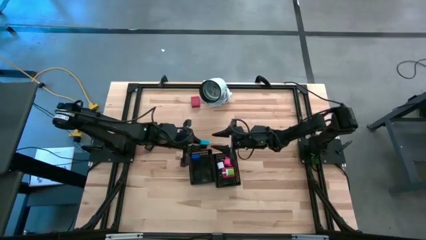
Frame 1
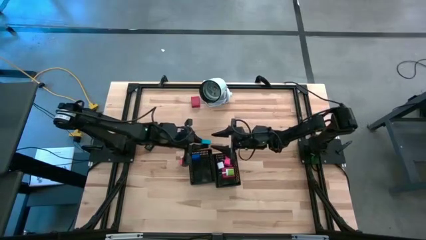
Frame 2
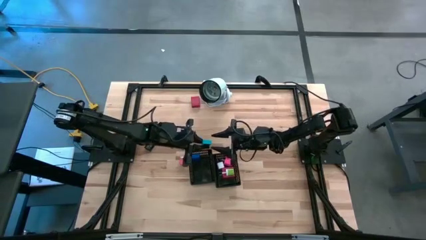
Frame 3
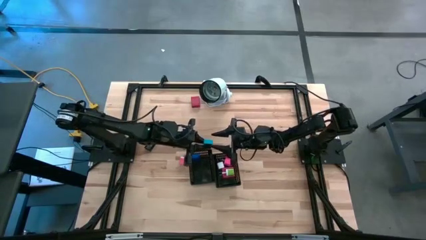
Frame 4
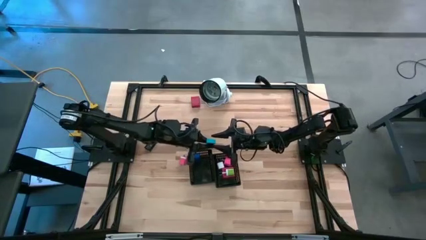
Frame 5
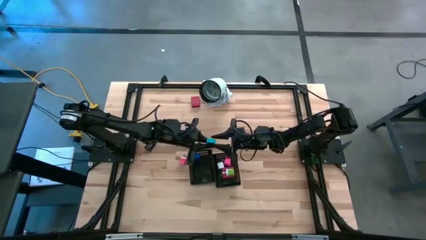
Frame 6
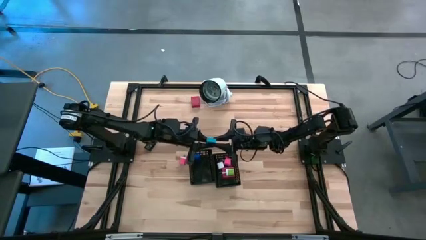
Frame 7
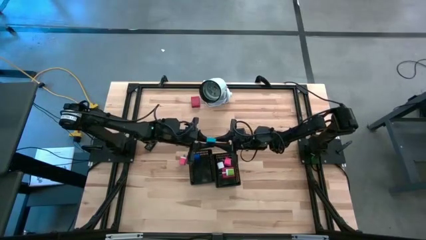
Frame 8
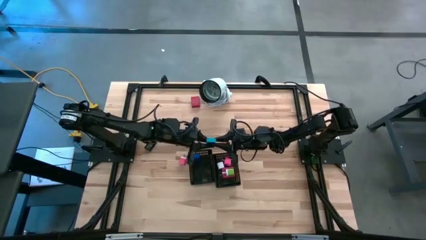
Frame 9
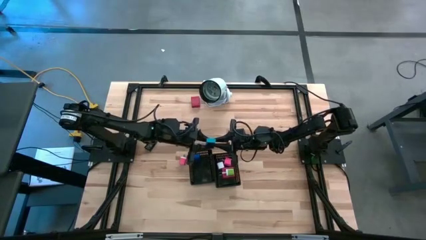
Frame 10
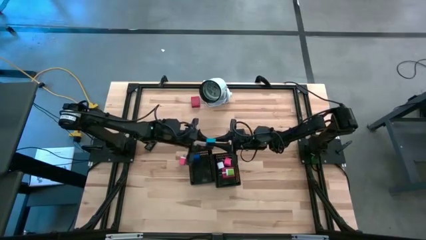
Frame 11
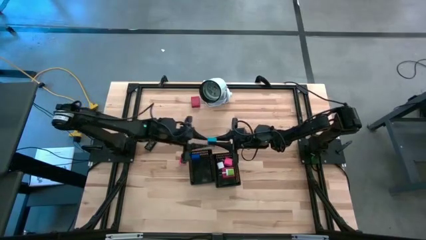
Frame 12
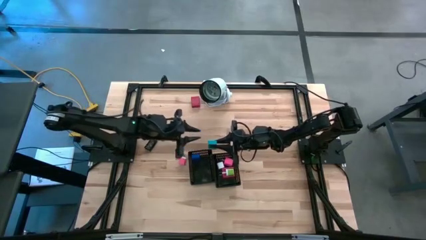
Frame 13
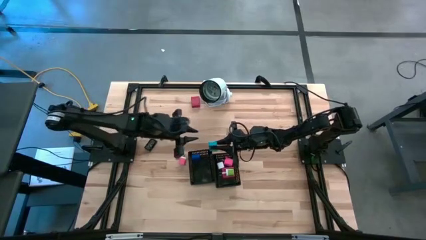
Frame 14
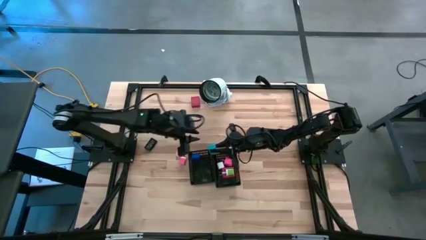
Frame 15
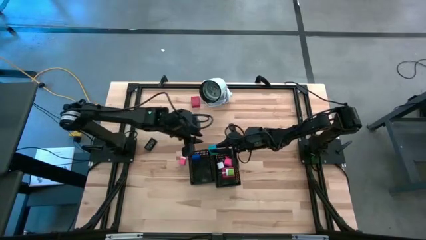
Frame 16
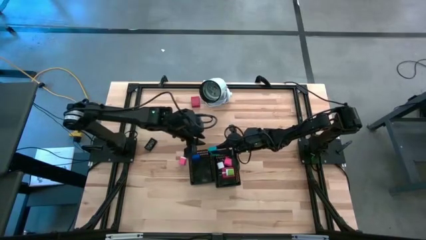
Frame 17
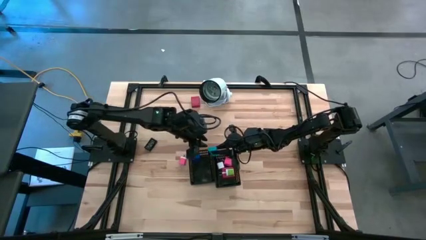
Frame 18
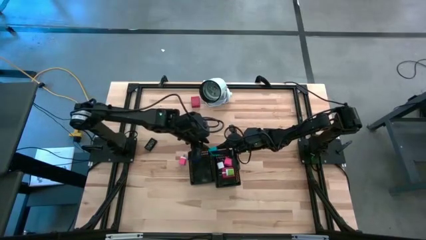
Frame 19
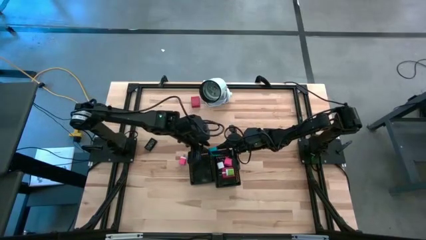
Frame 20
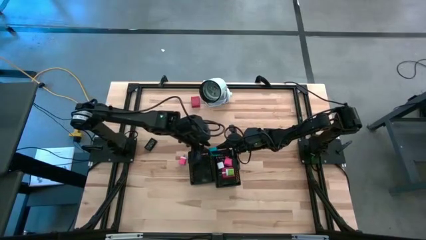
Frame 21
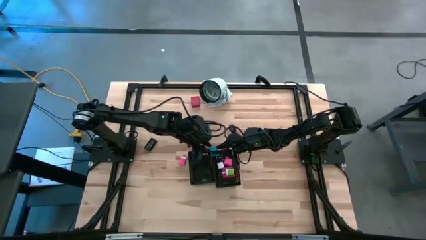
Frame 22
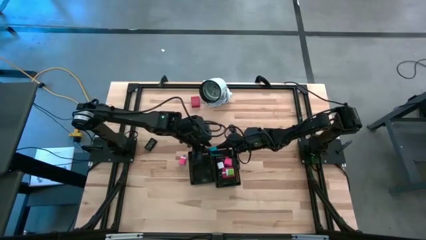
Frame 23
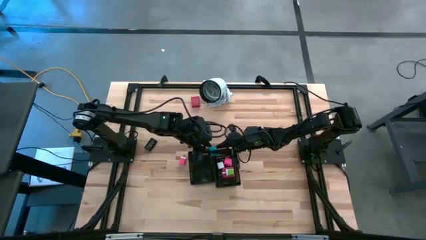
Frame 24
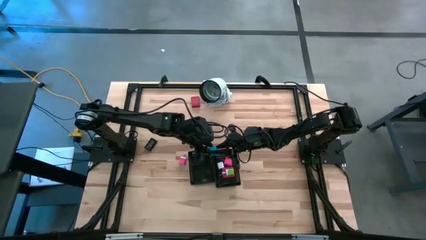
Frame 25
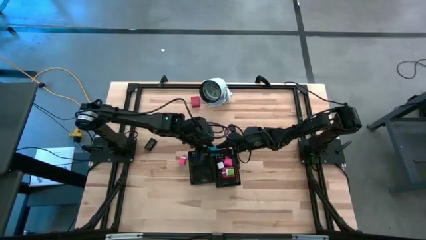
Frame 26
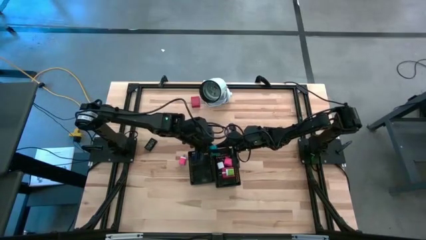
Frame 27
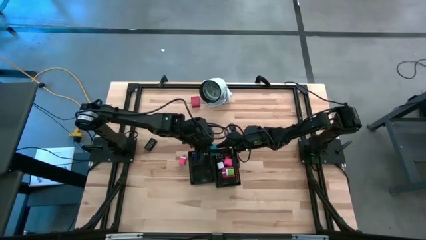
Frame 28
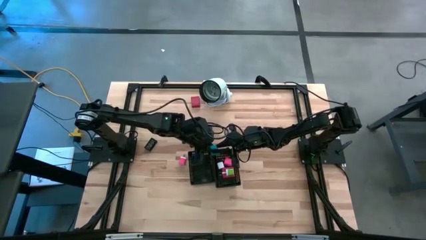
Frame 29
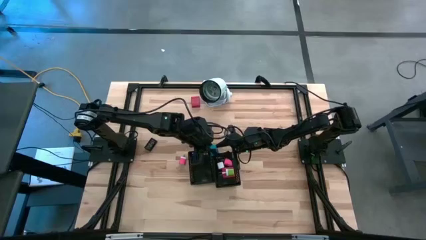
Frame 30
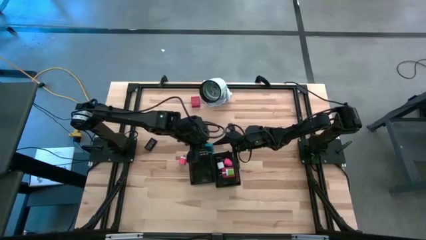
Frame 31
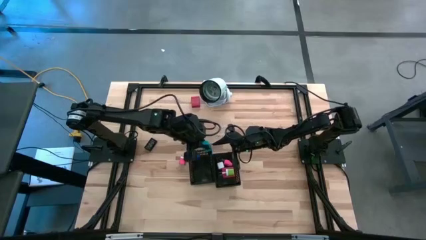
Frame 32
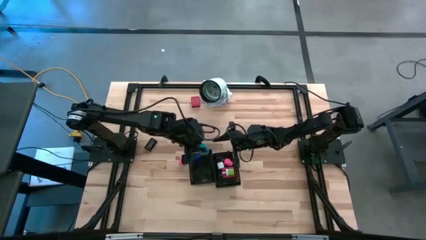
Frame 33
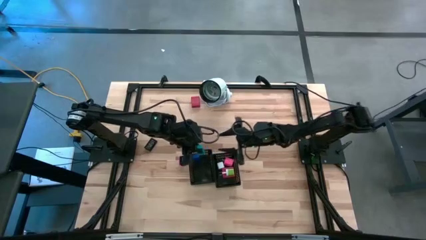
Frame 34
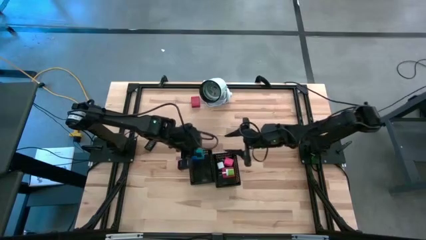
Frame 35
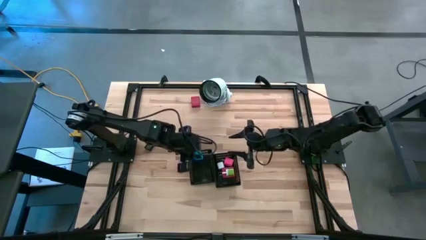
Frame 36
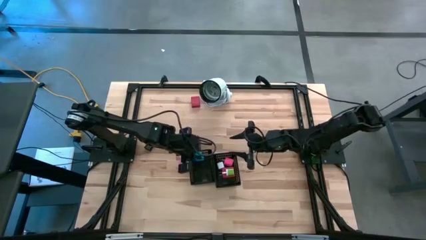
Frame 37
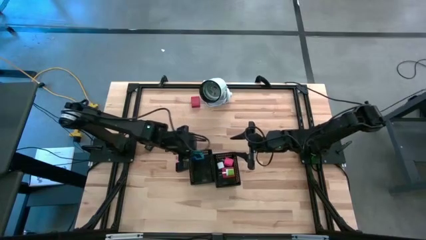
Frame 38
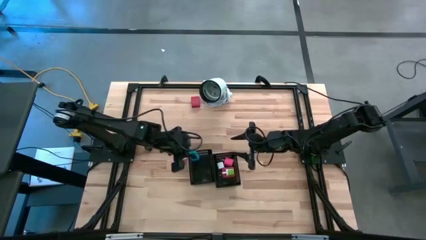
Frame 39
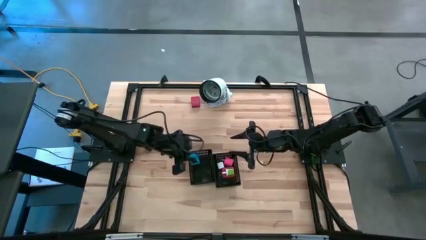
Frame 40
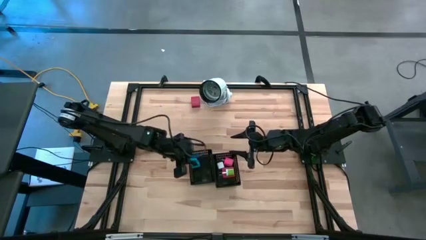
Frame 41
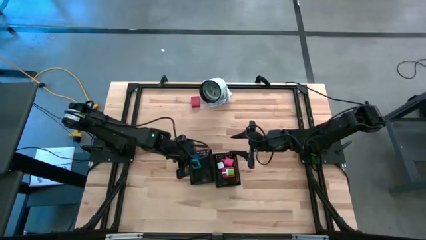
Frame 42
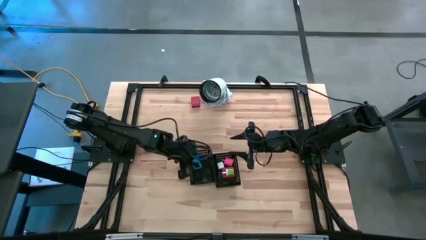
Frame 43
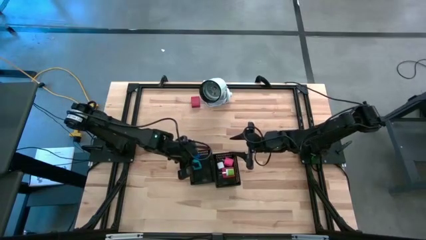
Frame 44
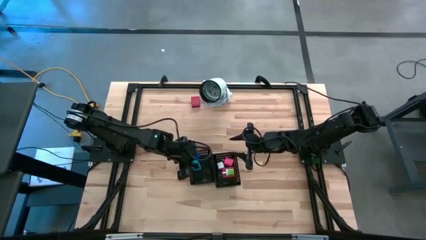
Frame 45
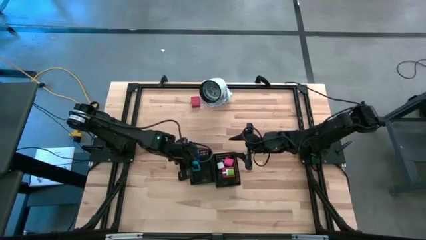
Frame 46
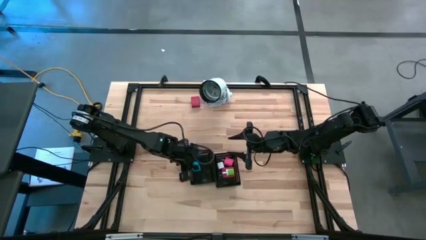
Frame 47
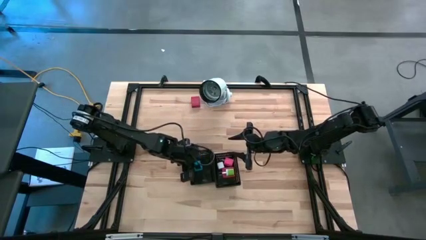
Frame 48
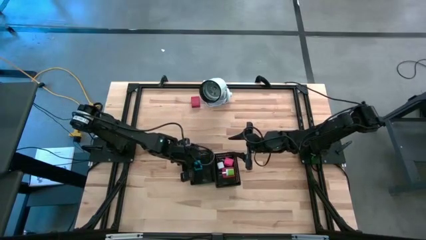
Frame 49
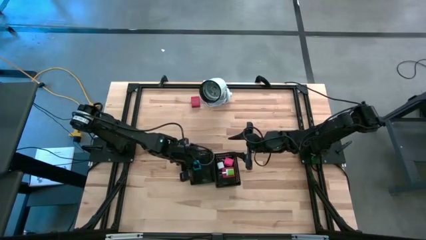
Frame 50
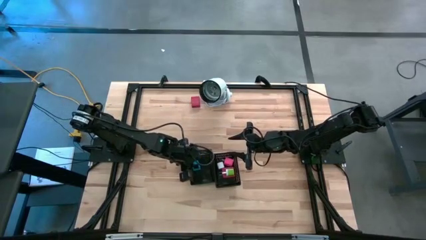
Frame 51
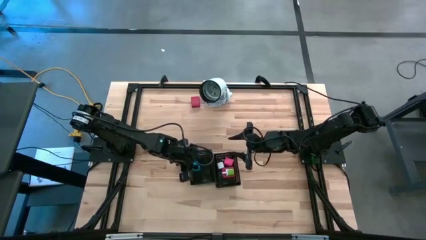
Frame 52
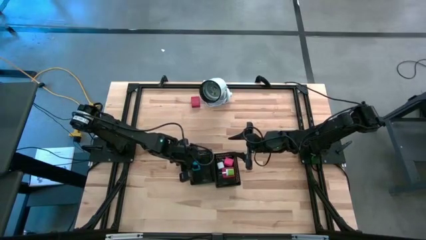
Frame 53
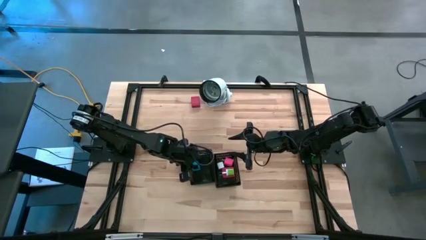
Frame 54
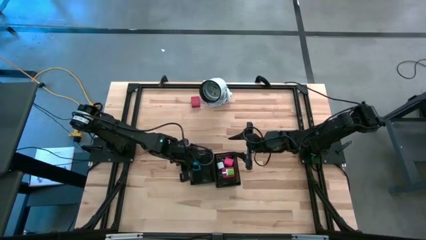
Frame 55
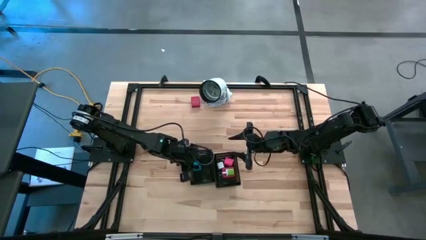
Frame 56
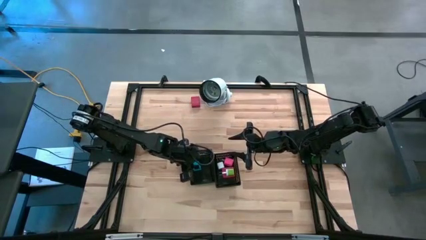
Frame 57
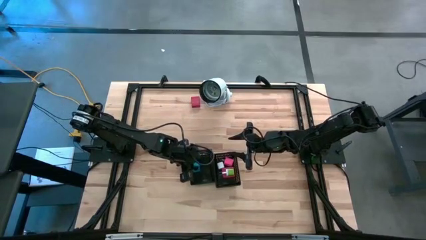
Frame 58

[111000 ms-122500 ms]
Task: Pick & Place Office items
Put the light blue digital clock into the left black bin

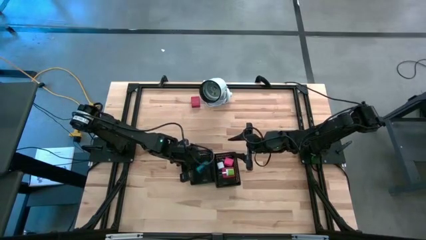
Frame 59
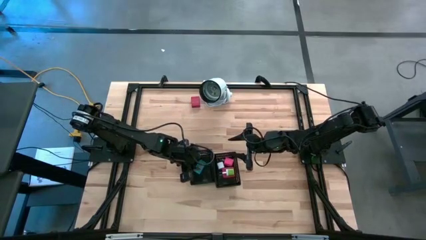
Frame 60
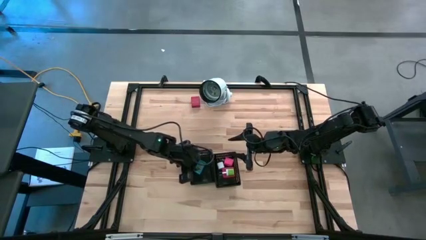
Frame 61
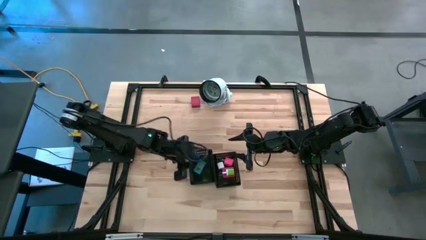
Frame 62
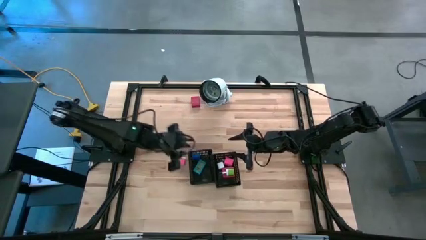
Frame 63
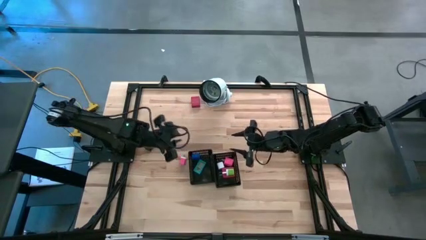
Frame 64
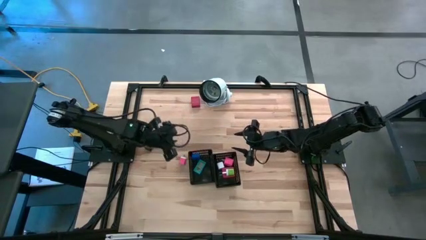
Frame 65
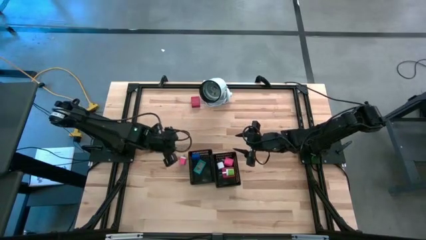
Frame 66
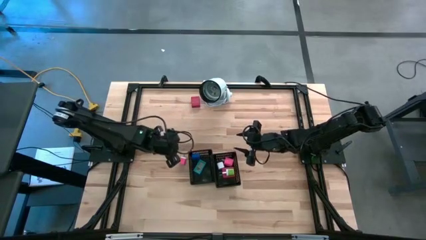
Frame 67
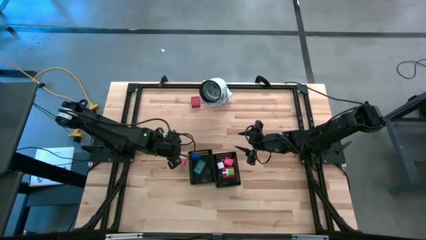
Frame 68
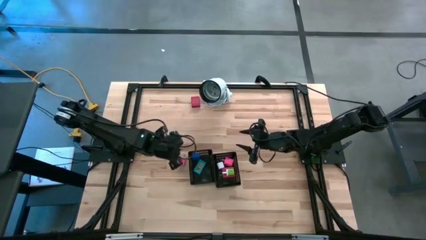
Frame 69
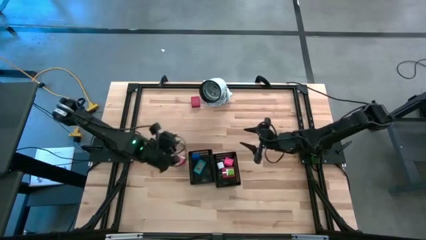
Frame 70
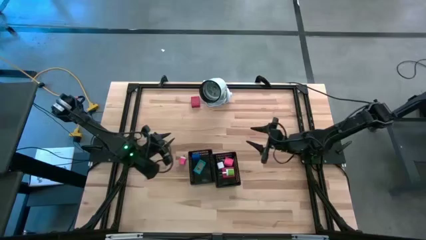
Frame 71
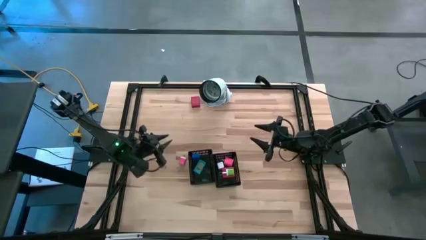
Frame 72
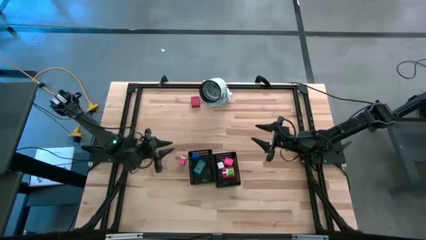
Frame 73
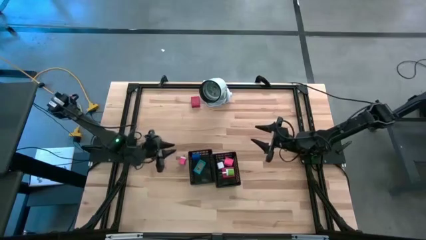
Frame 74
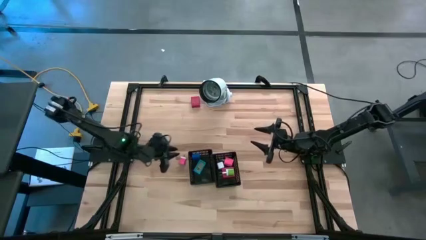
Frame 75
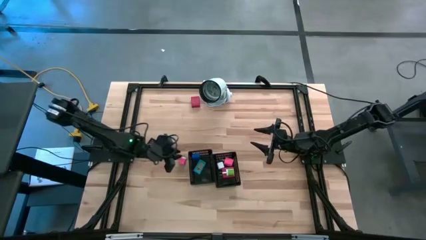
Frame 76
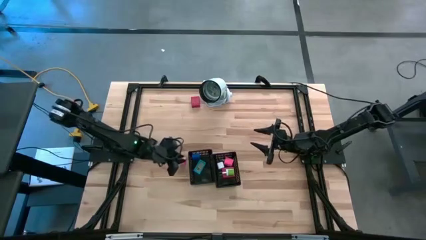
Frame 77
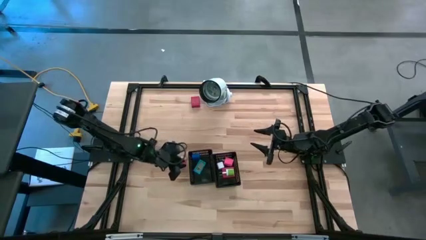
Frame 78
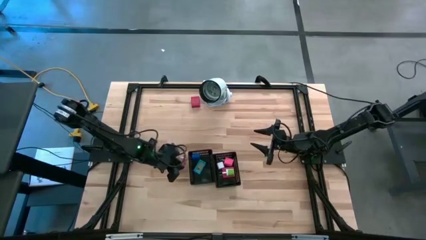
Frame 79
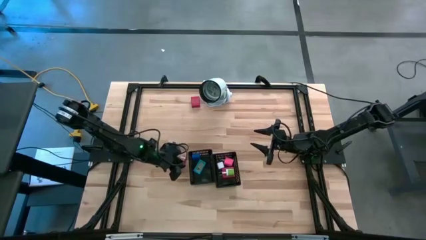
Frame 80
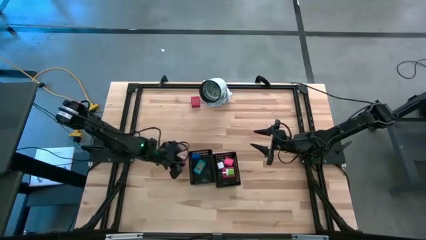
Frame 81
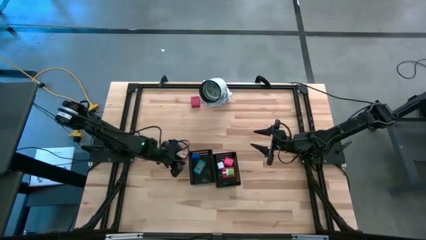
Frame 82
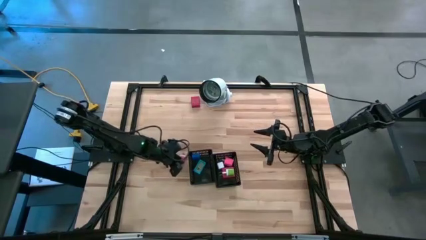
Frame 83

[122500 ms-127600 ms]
Put the pink and white charger adapter into the right black bin
